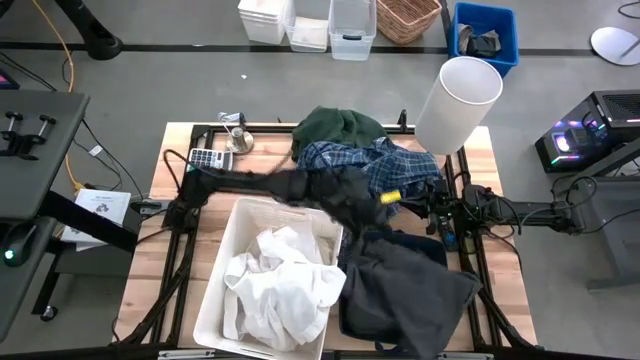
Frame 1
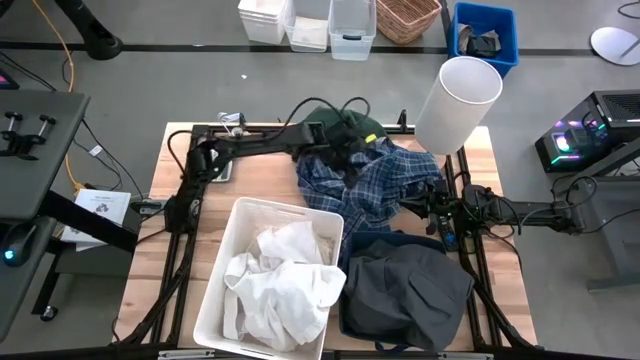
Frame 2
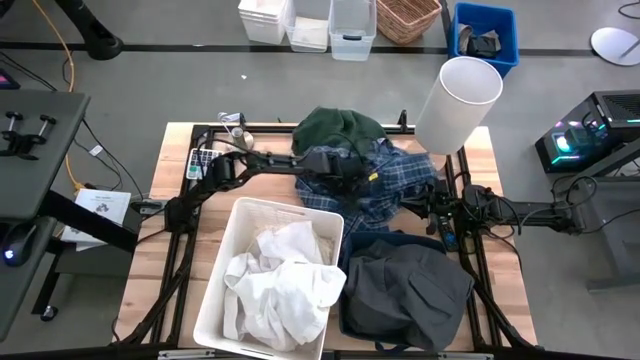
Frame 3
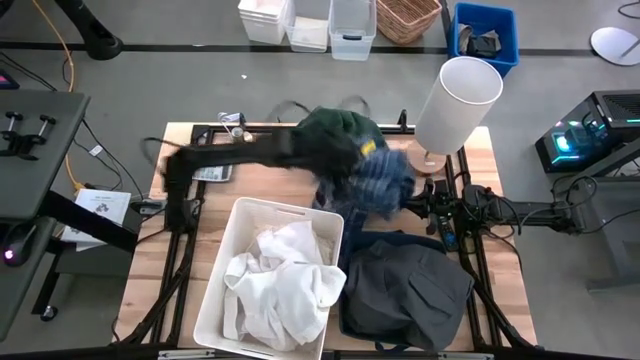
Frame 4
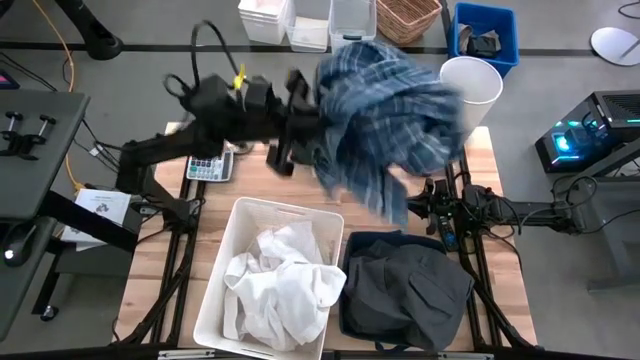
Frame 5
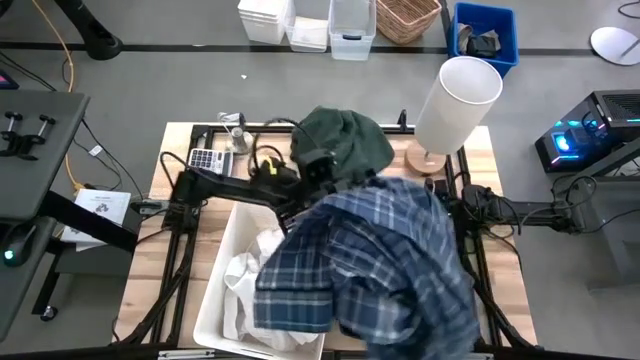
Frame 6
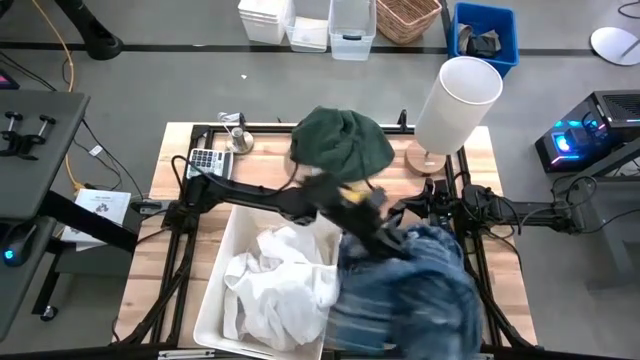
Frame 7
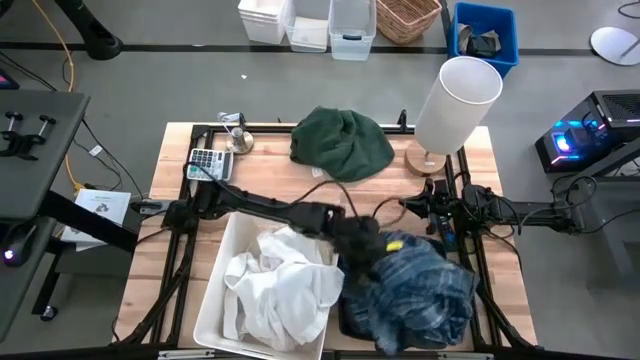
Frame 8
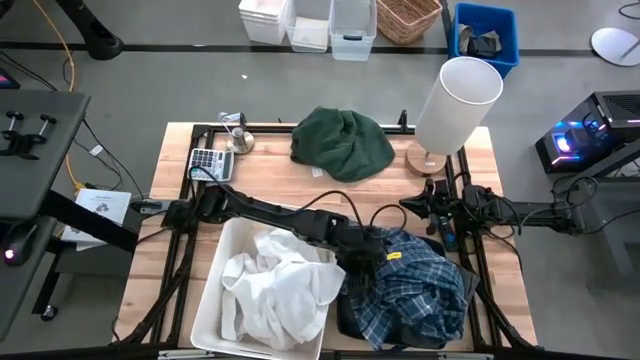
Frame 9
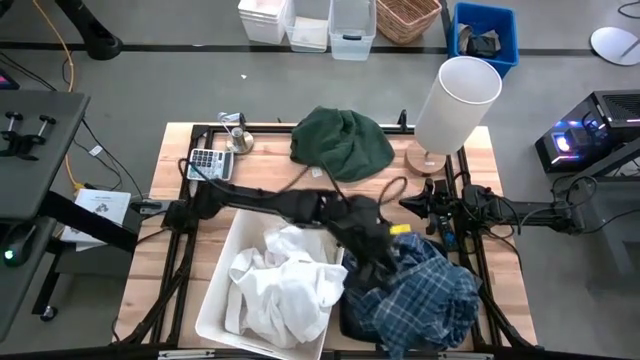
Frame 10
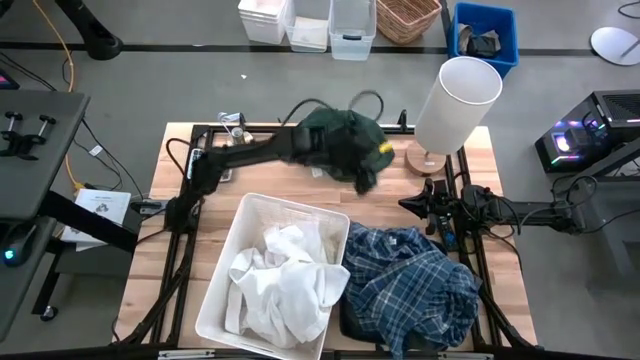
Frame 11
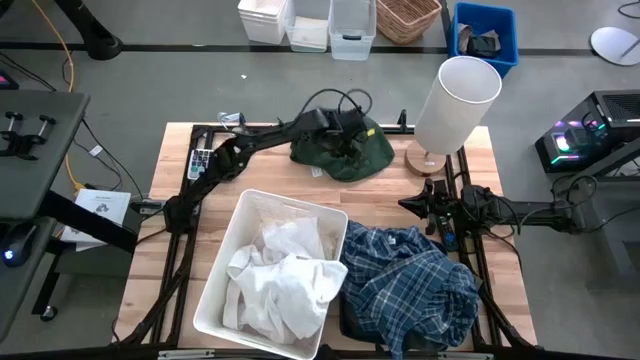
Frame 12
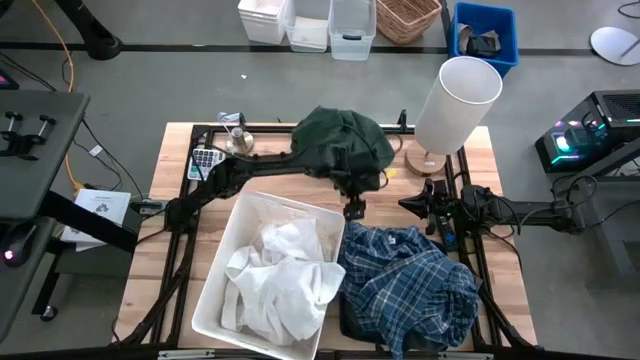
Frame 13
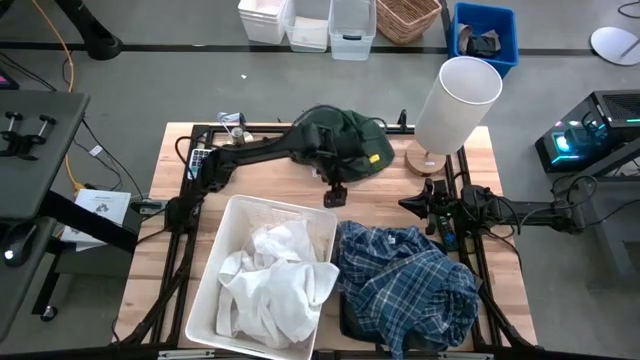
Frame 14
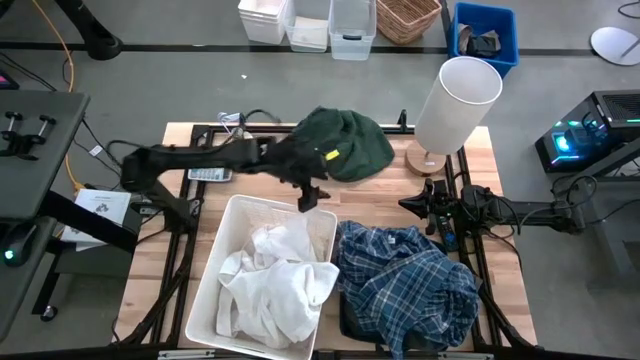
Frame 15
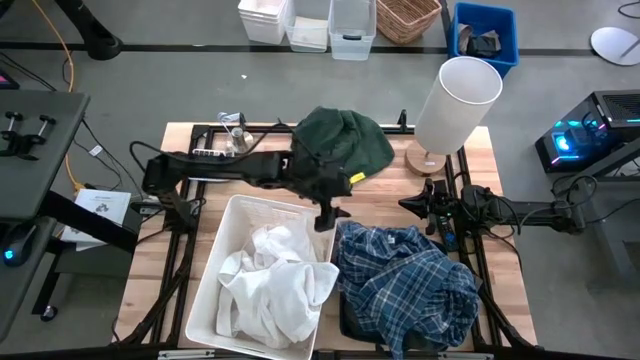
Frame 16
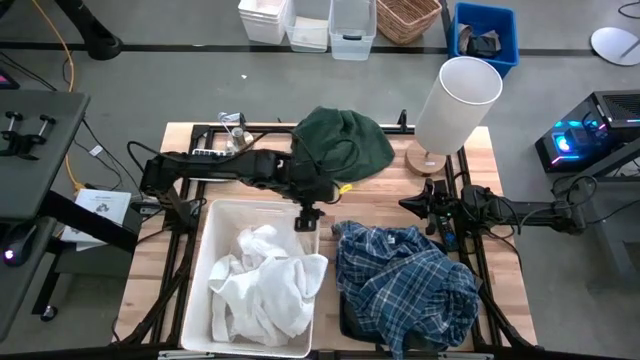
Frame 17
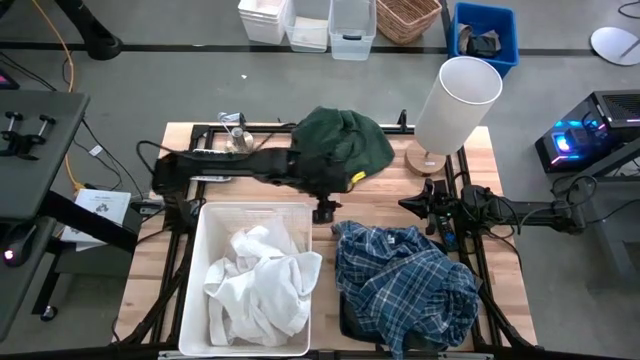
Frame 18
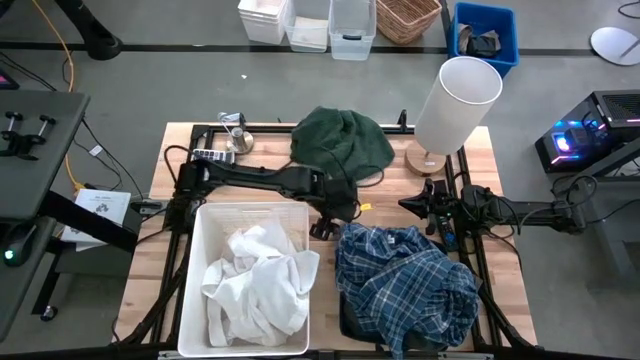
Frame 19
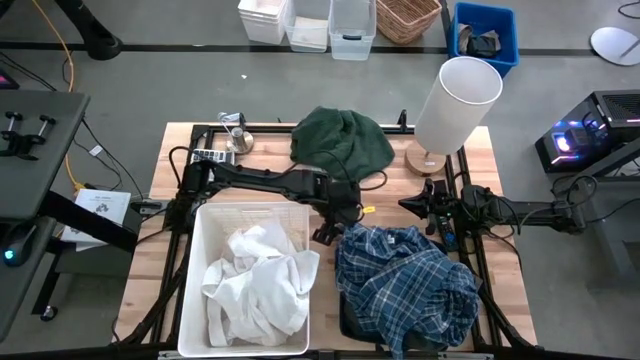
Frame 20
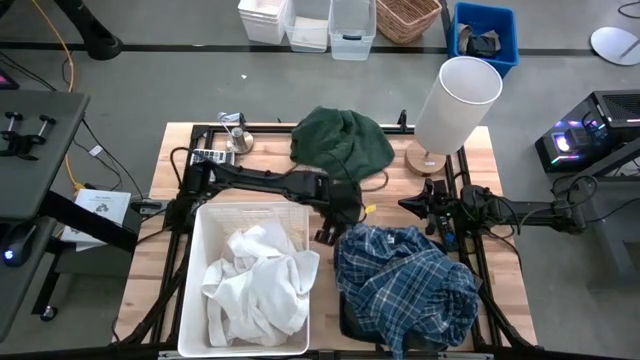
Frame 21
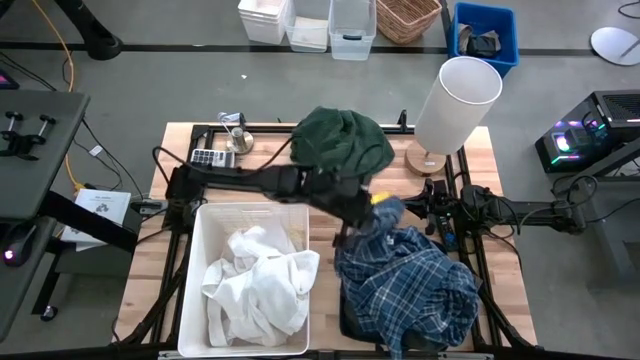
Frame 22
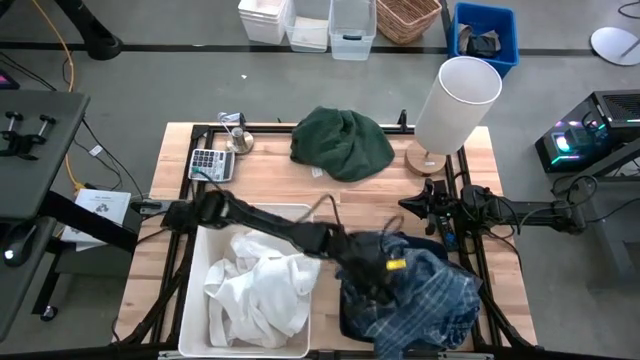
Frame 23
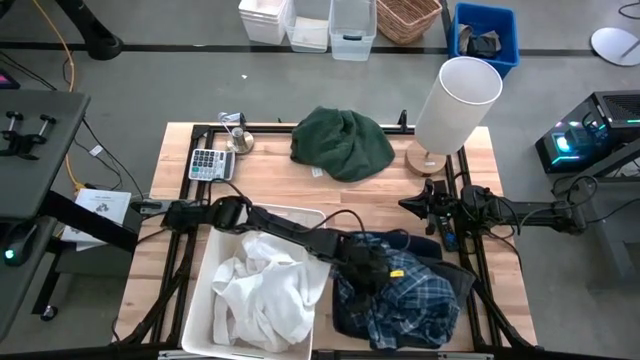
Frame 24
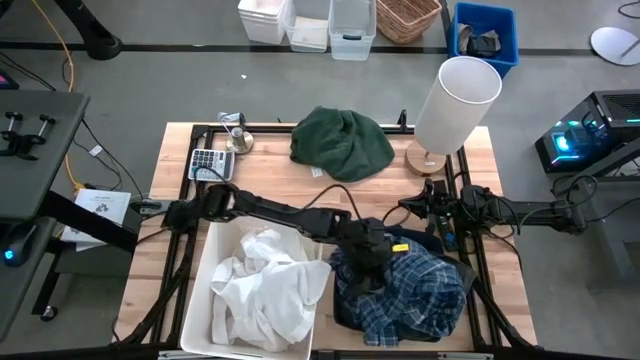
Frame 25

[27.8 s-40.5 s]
Task: Sort clothes
Put the blue pattern cloth into the blue laundry bin

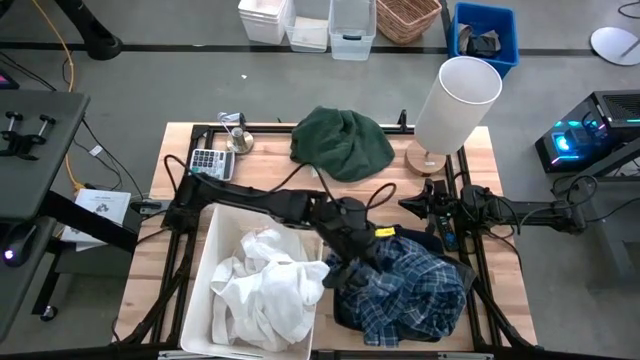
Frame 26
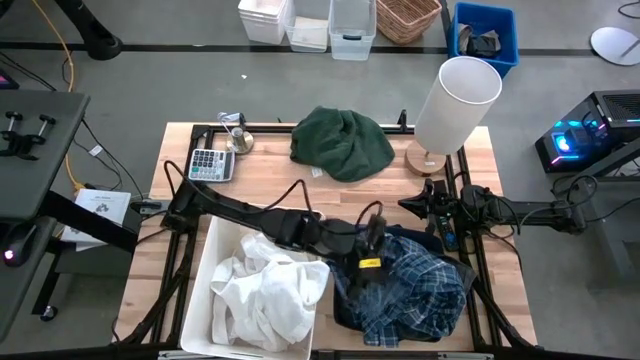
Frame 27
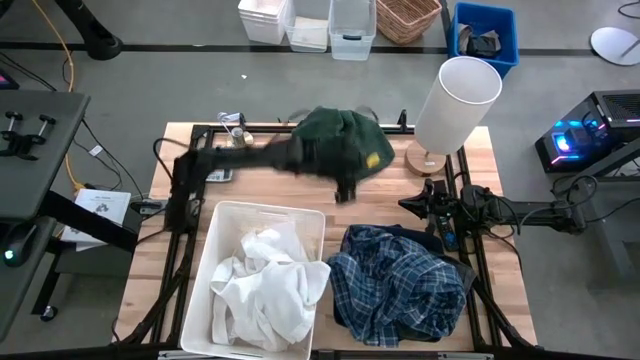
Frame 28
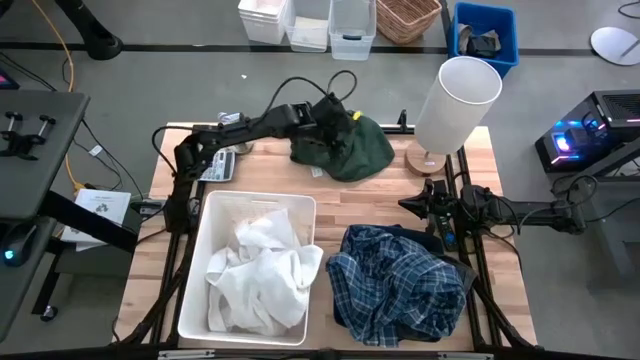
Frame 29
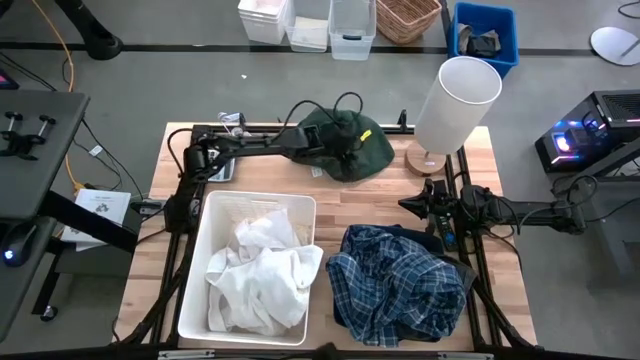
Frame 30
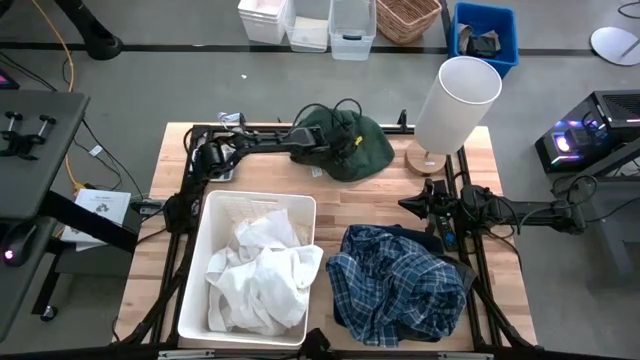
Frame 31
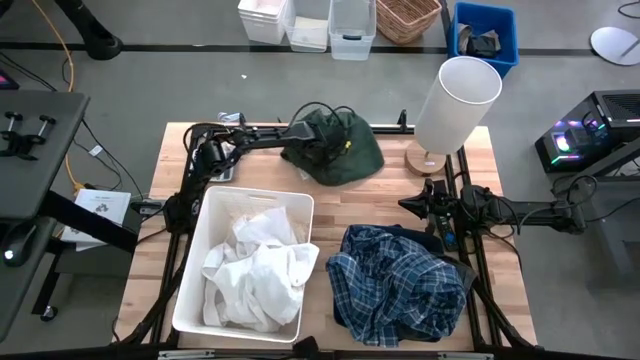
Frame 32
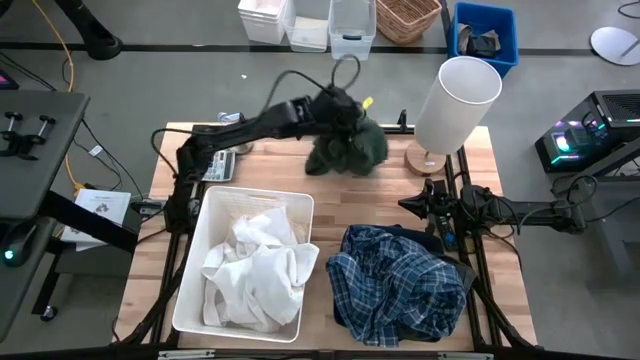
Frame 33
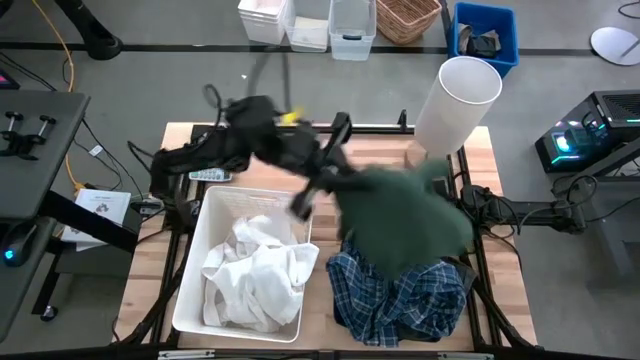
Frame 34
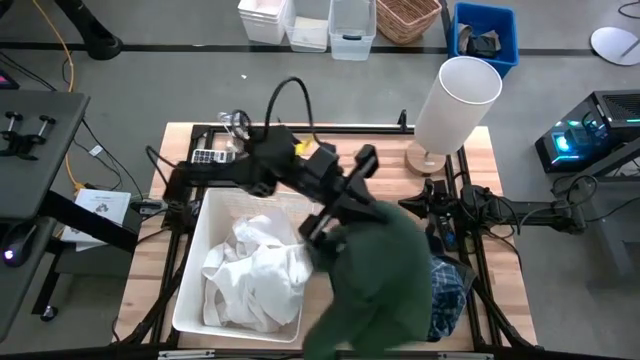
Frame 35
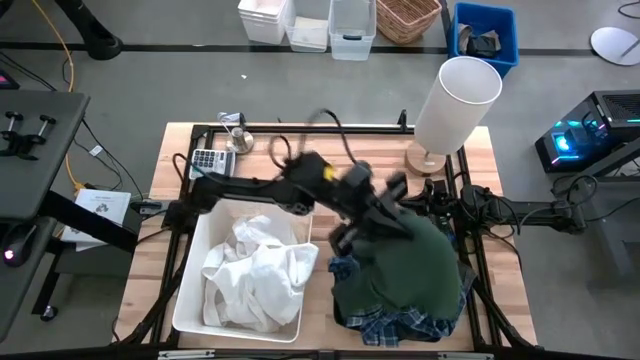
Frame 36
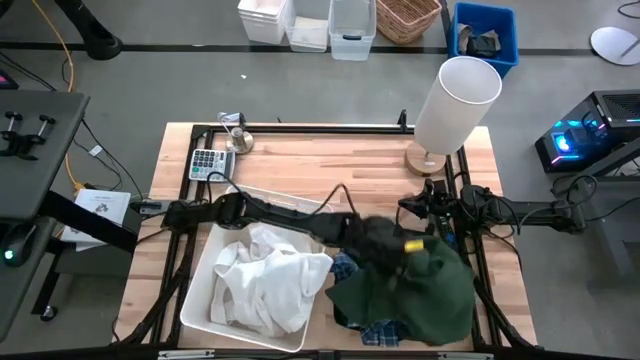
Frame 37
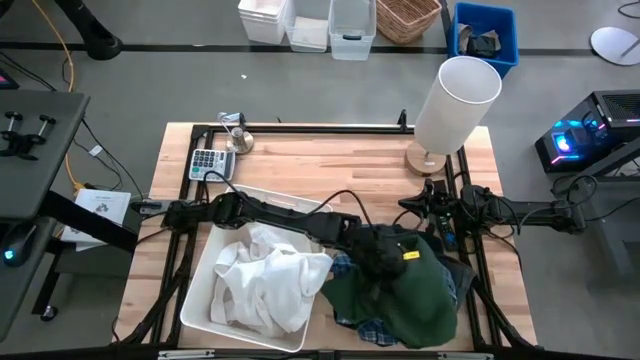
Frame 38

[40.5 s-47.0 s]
Put the green cloth into the blue laundry bin

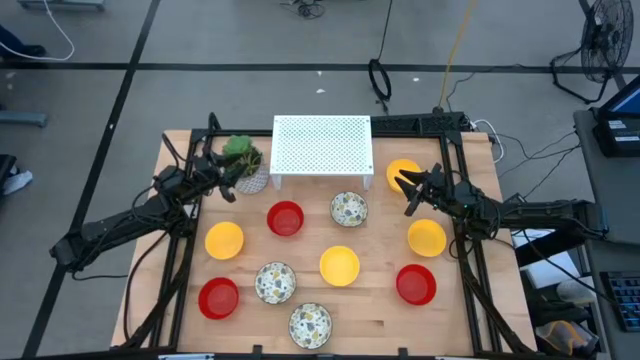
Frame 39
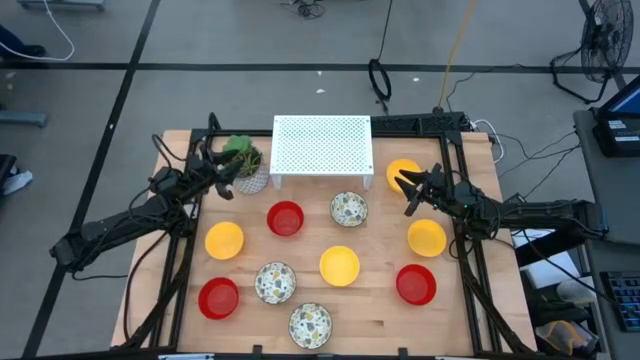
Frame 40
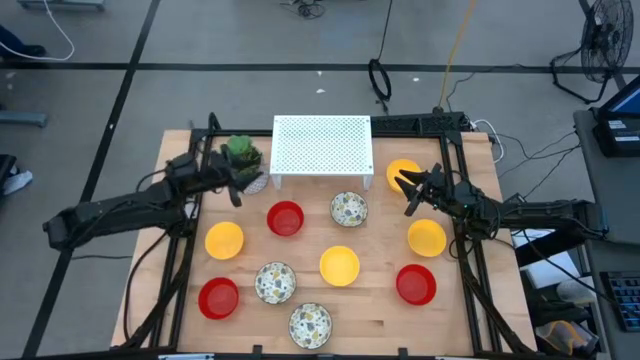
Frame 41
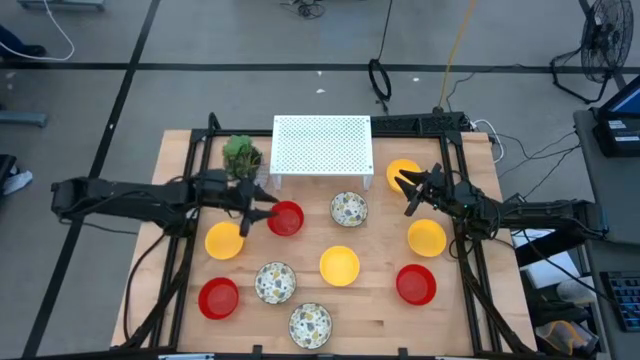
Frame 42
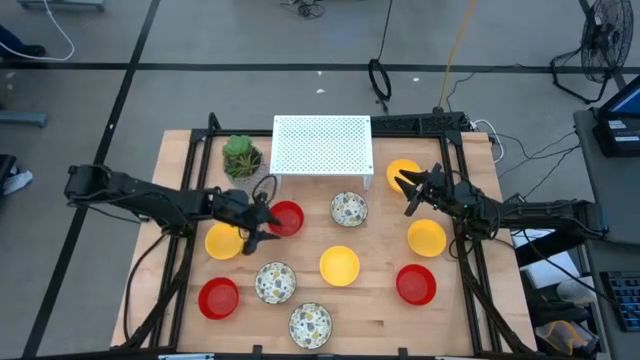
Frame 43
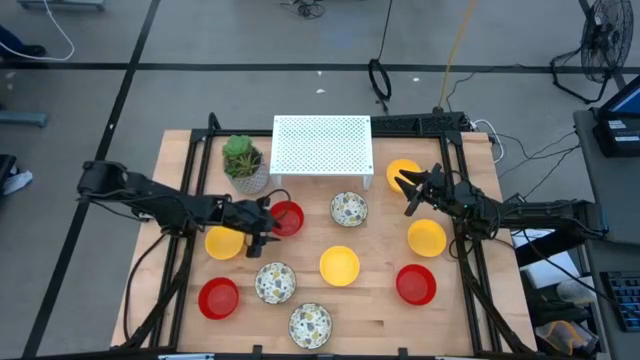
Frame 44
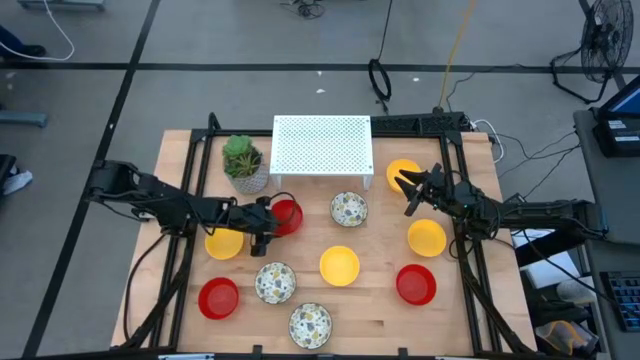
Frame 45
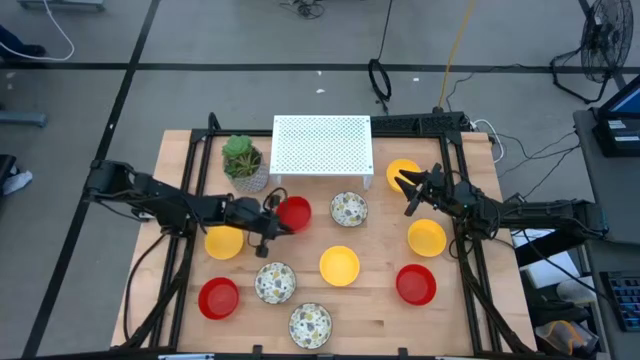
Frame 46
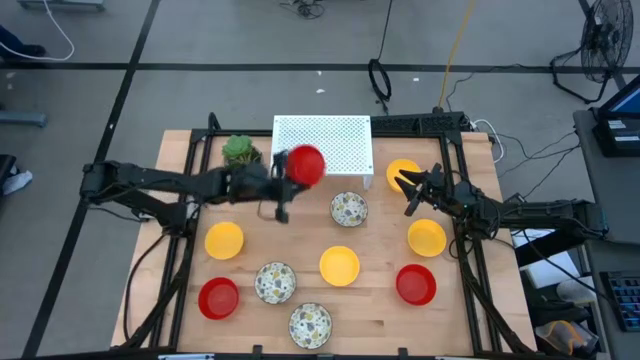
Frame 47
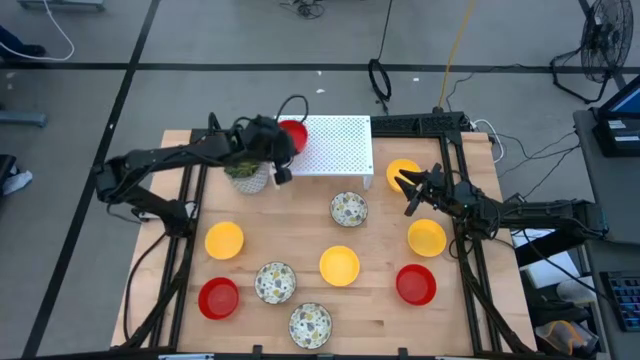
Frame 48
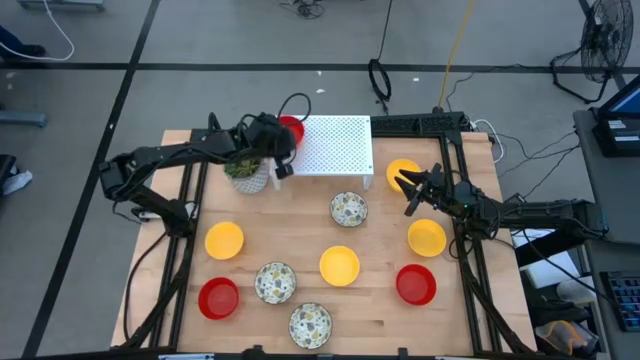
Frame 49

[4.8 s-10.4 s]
Task: Pick & Place Mini bowls
Put the red bowl on the shelf
